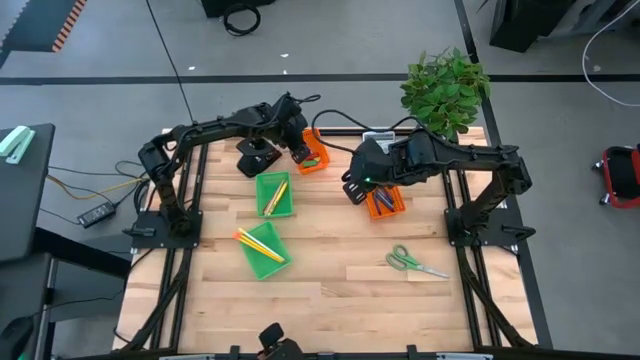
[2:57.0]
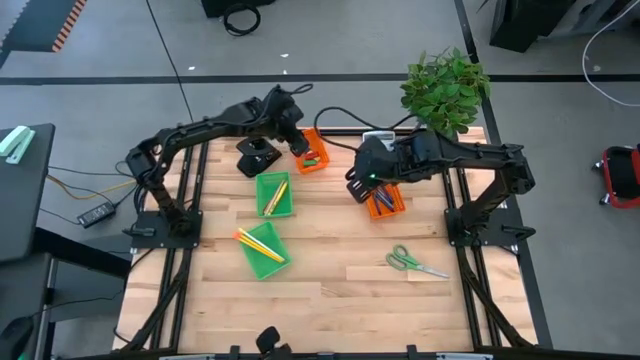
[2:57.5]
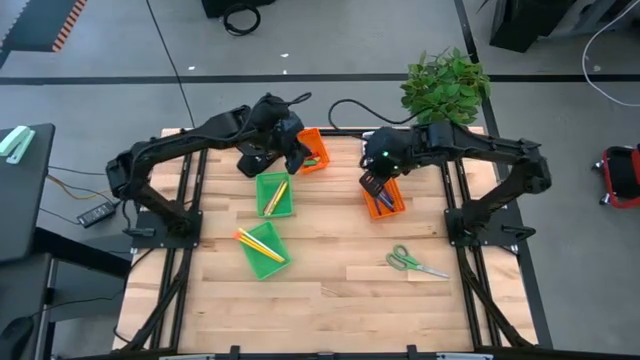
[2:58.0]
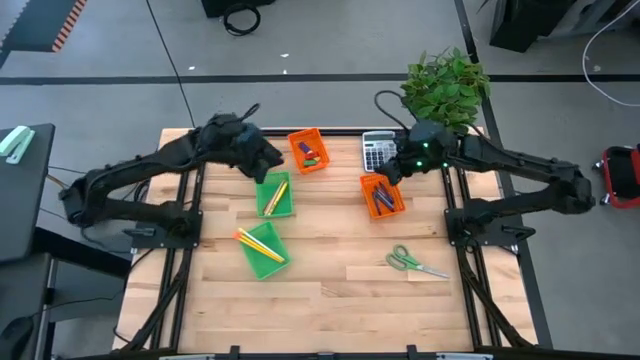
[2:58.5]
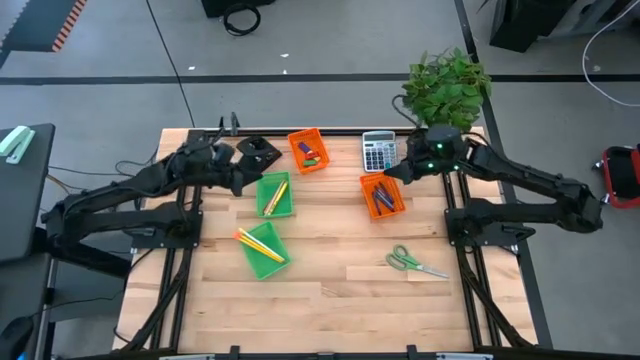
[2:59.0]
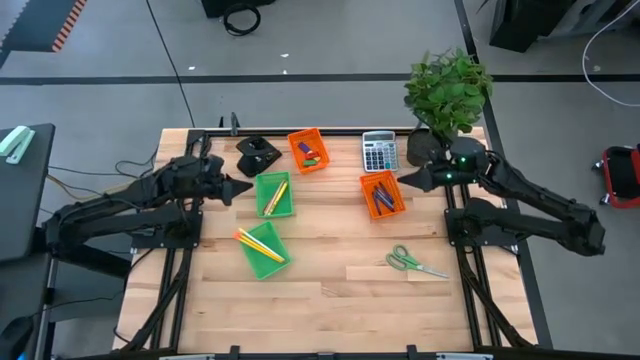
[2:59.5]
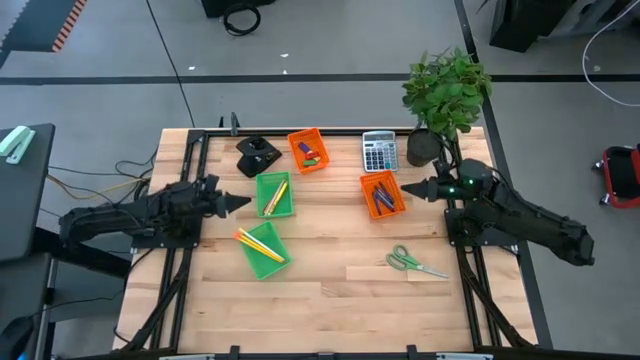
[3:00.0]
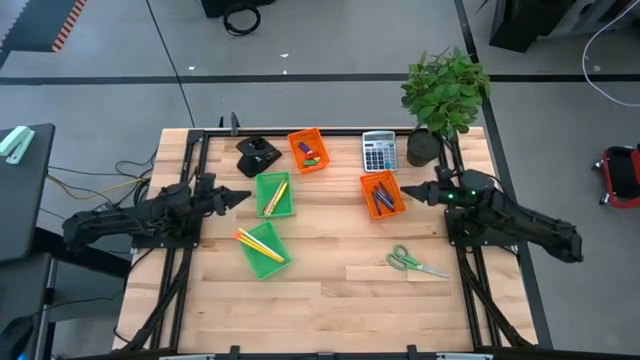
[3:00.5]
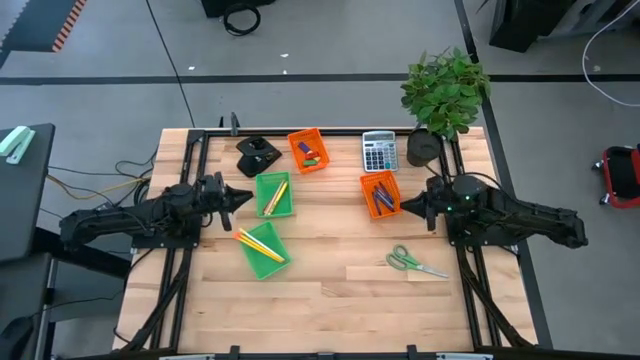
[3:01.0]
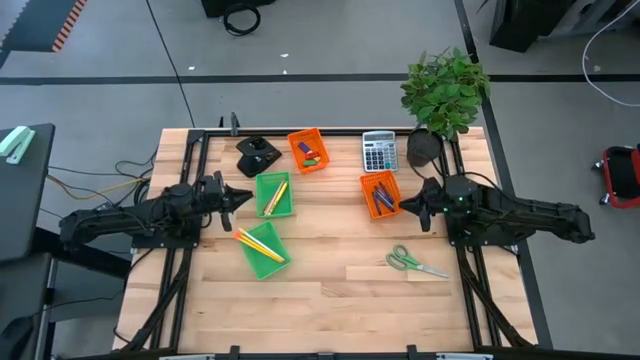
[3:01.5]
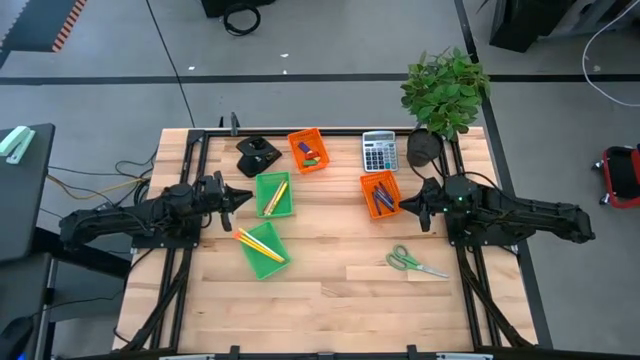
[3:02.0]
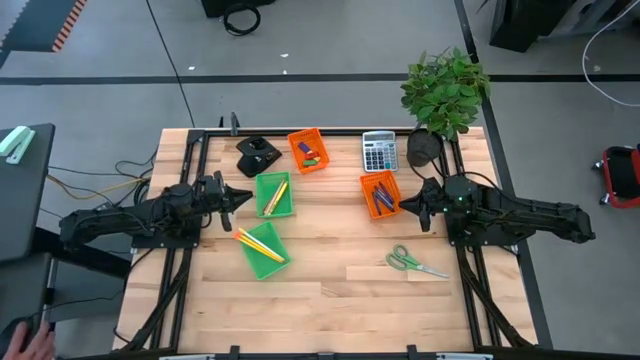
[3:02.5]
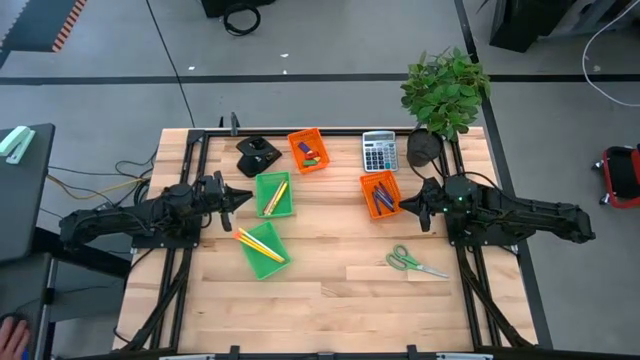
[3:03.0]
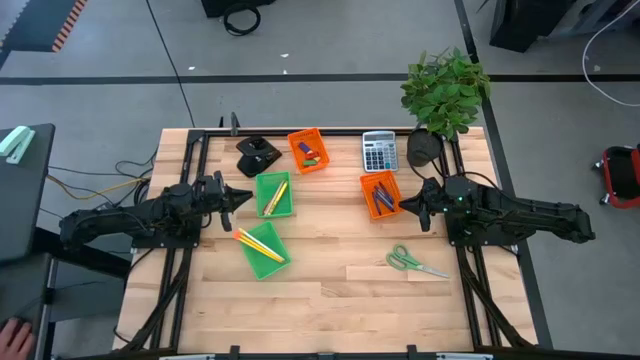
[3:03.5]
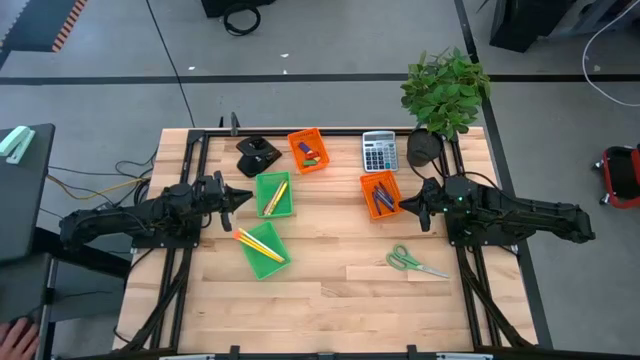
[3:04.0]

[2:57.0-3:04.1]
Task: Sort crayons/erasers/pens/pencils in bins
Return to Home Position

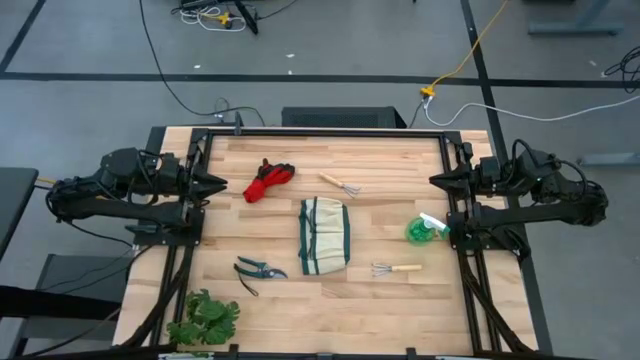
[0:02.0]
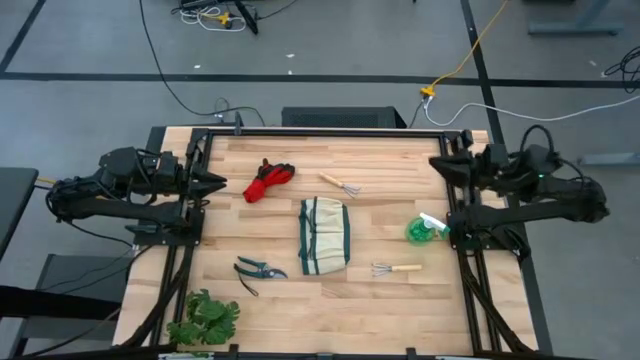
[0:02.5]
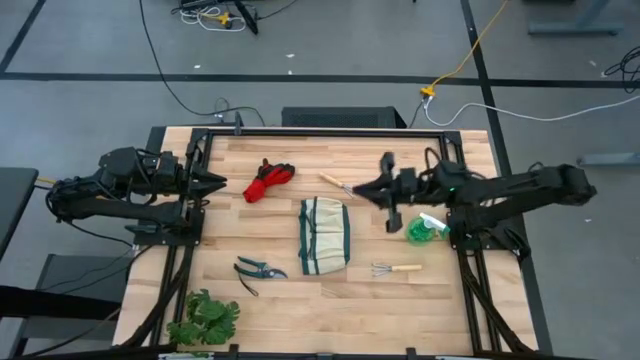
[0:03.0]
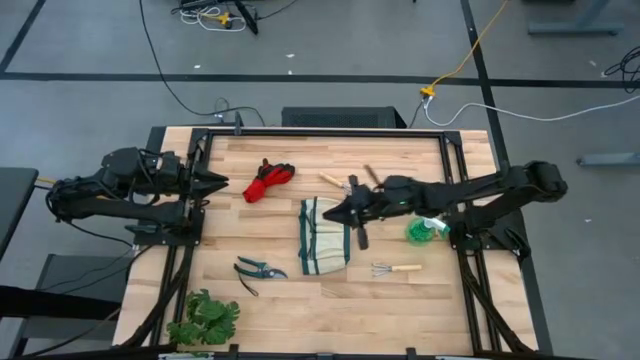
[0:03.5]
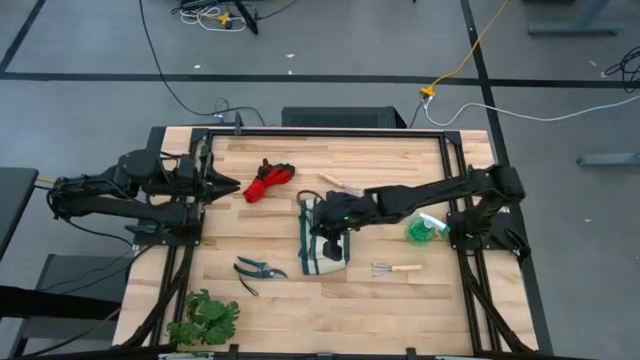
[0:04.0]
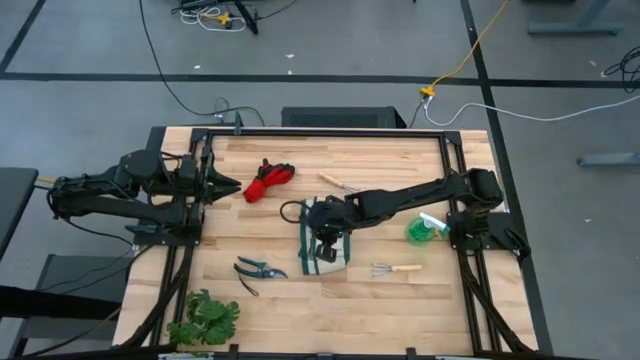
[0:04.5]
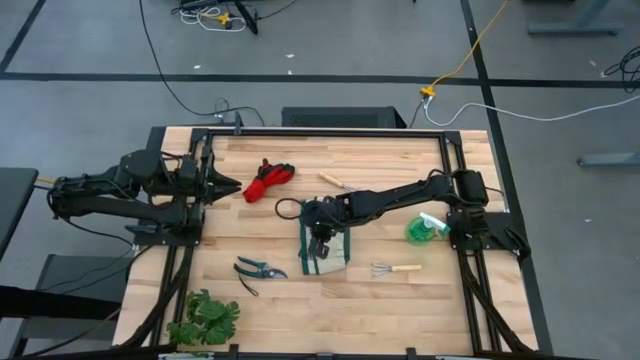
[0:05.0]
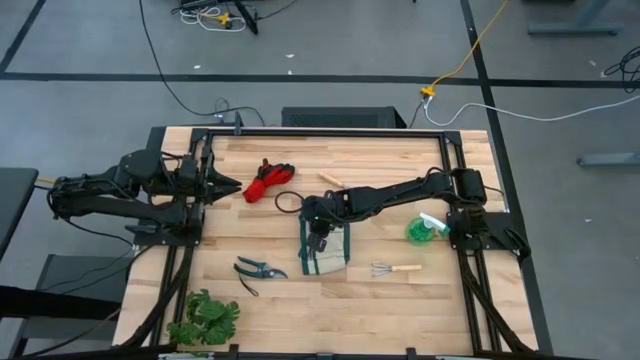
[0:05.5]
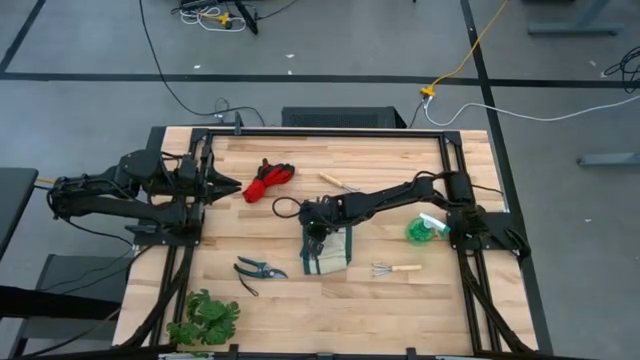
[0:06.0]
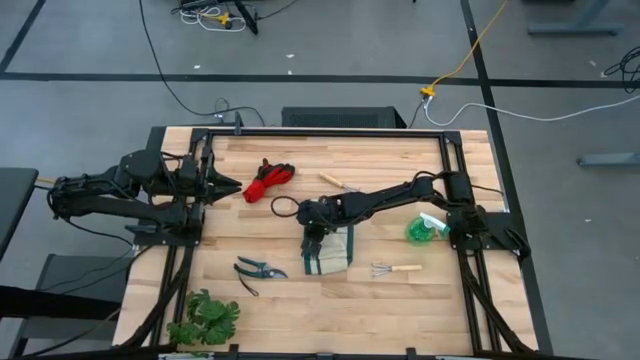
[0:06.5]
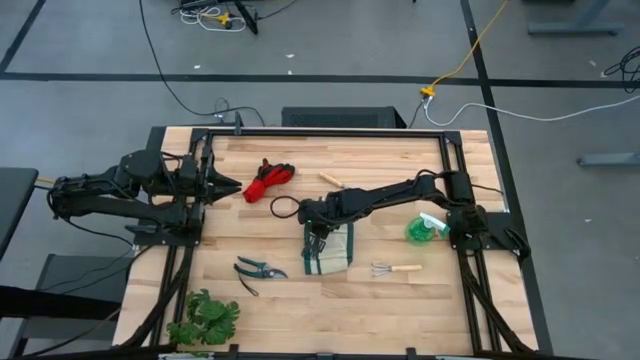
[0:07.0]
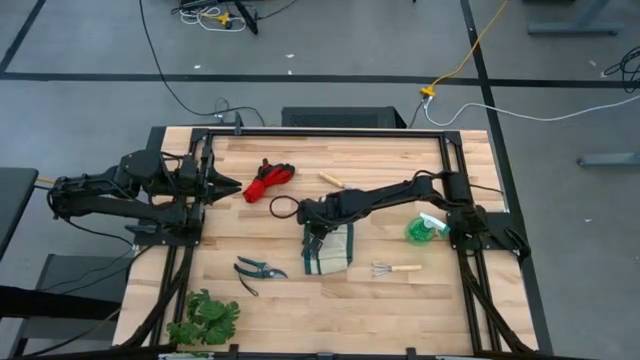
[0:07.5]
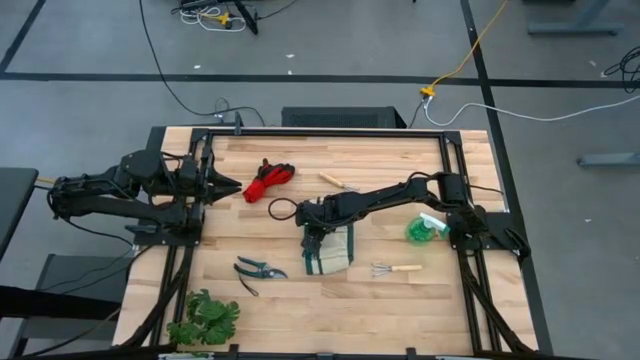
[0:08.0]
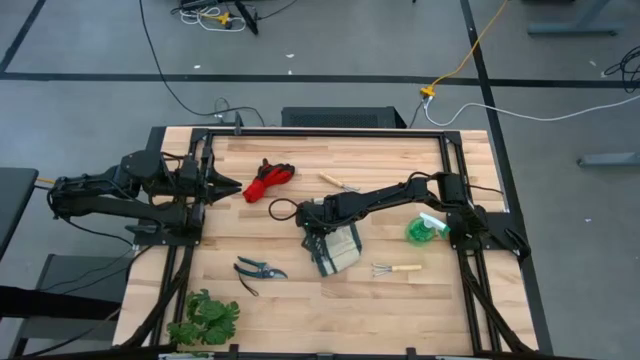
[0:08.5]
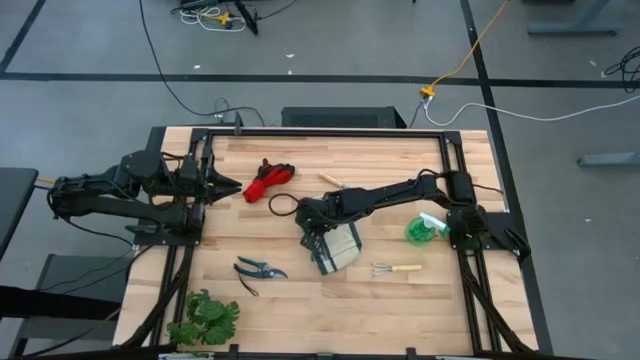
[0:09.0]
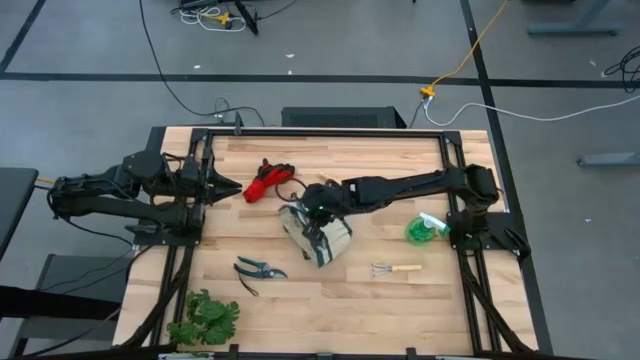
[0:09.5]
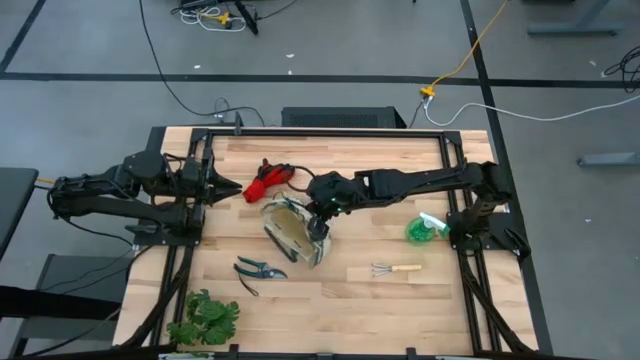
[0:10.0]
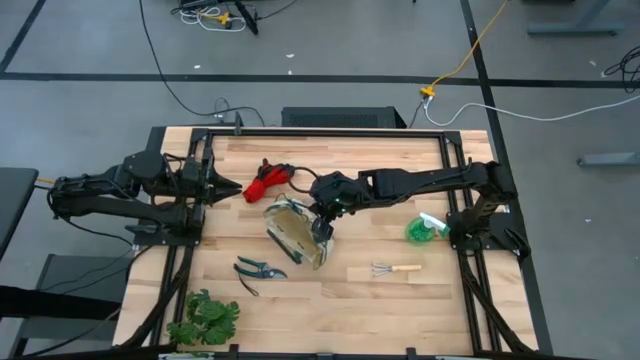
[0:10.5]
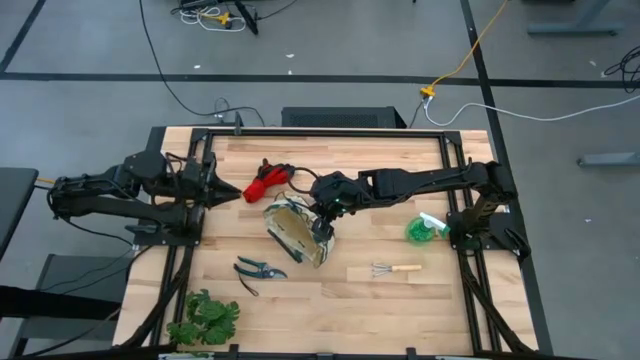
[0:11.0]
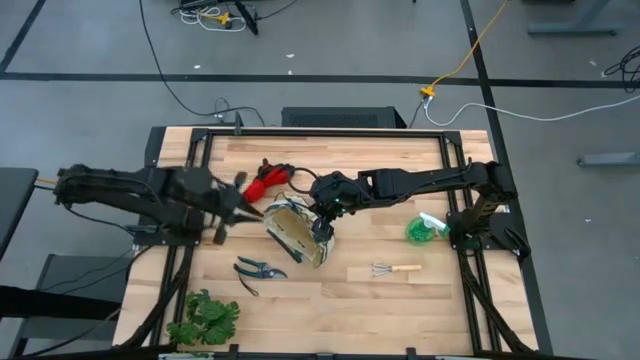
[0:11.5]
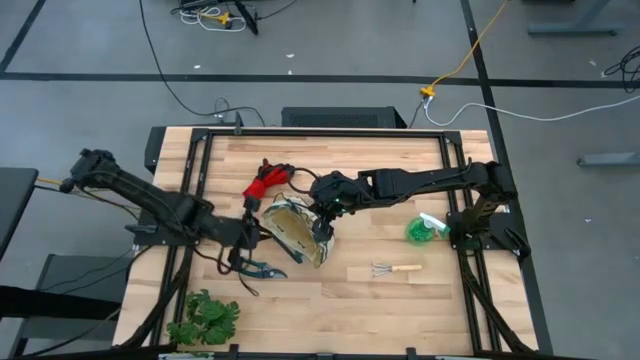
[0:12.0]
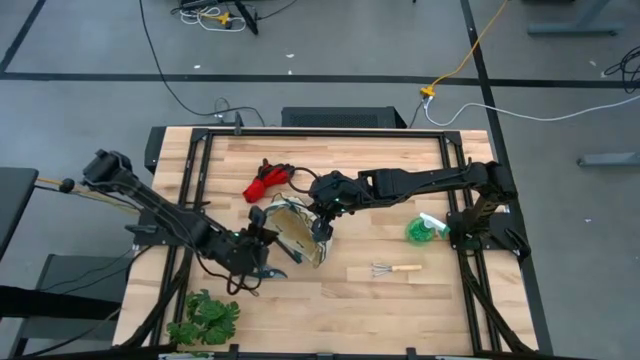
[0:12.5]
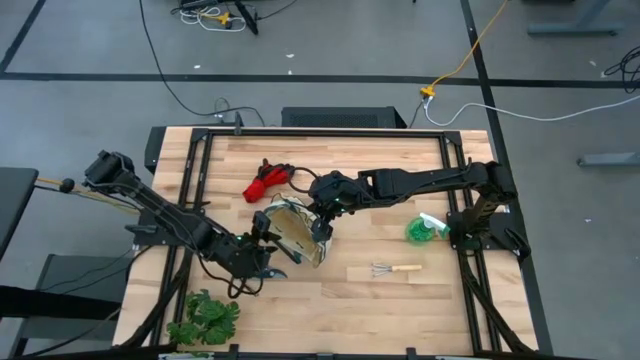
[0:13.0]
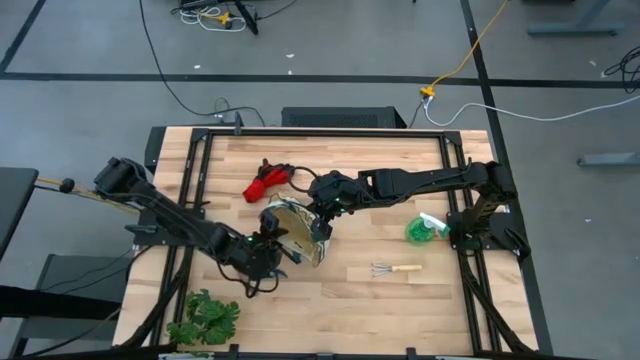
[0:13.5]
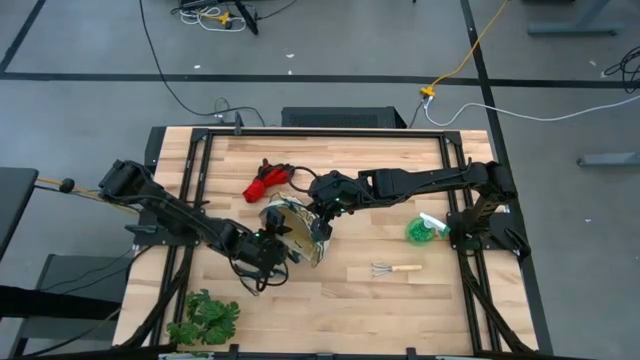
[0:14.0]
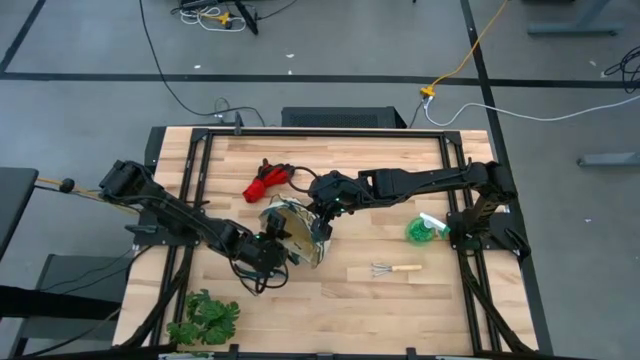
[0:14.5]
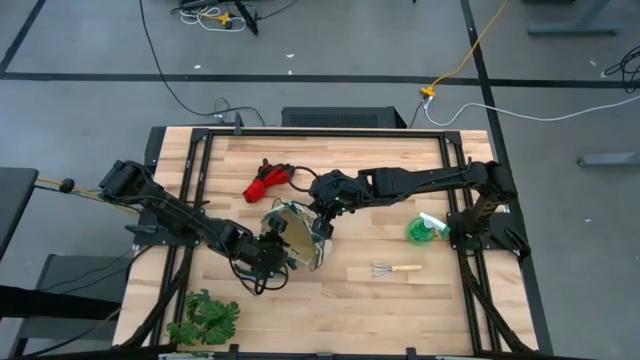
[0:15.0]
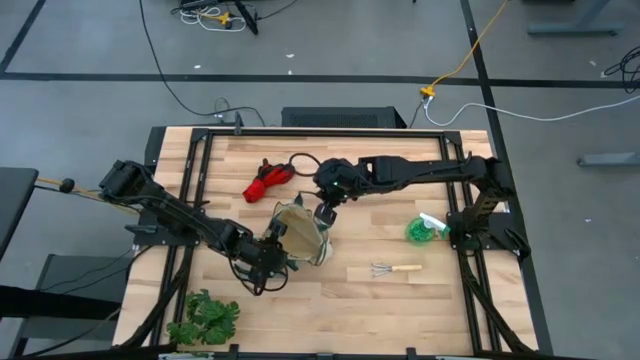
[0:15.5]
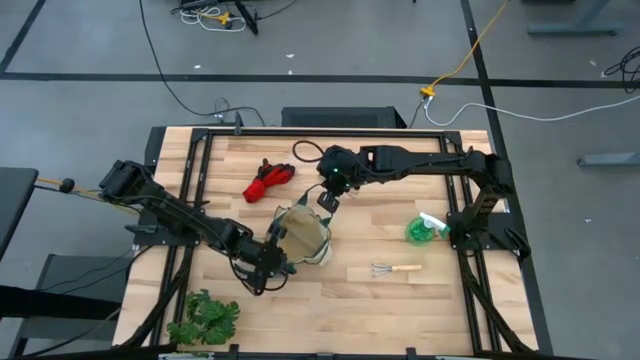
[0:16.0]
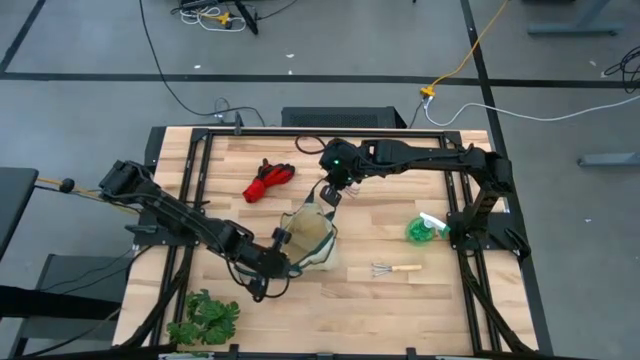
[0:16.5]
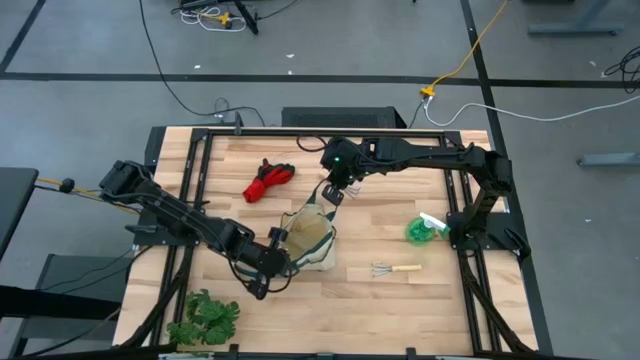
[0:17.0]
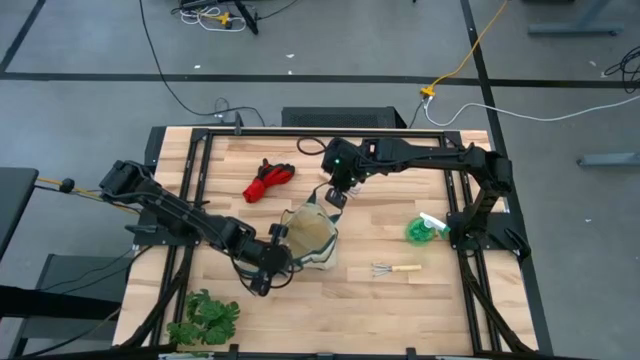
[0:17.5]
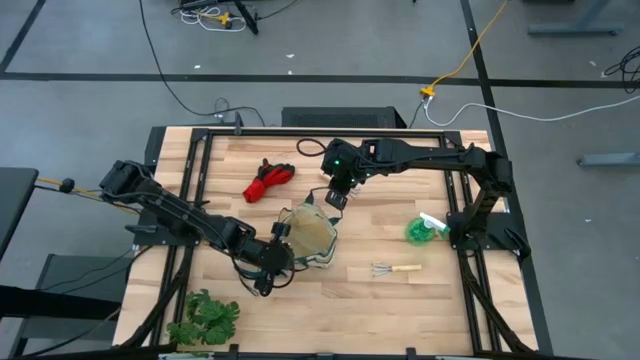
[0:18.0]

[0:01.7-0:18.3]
Task: Pick & Place Garden tools in Gardening bag
Prepare the gardening bag
